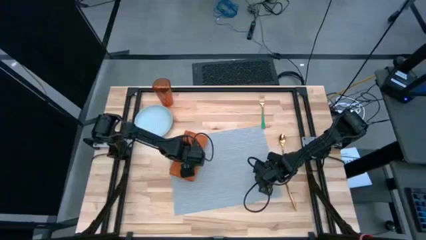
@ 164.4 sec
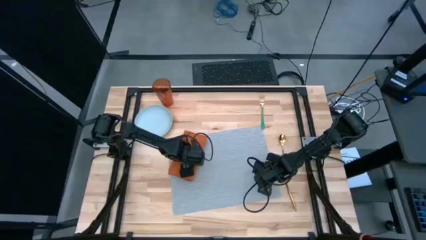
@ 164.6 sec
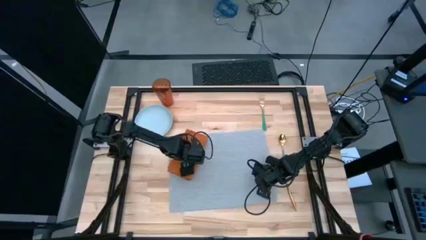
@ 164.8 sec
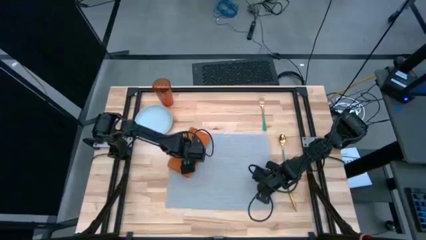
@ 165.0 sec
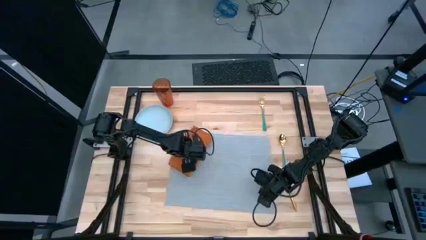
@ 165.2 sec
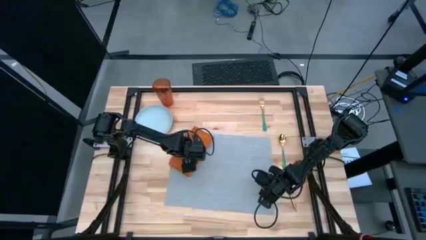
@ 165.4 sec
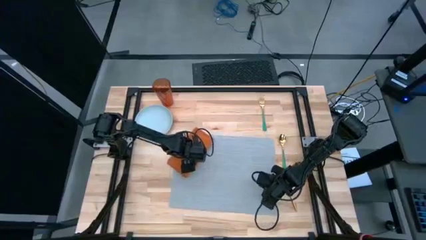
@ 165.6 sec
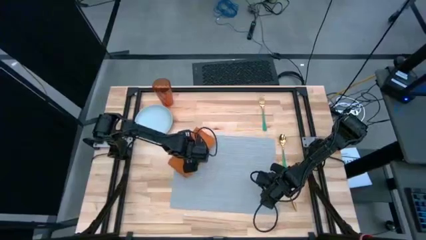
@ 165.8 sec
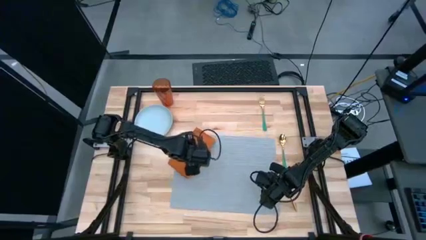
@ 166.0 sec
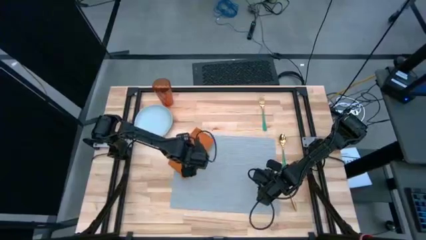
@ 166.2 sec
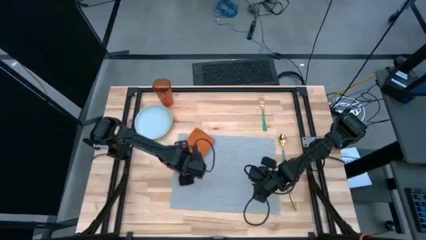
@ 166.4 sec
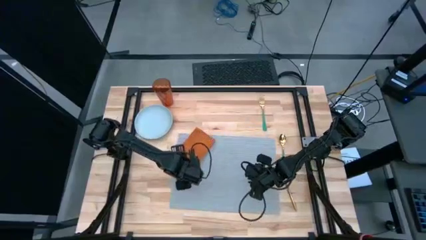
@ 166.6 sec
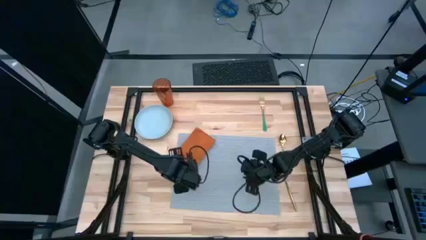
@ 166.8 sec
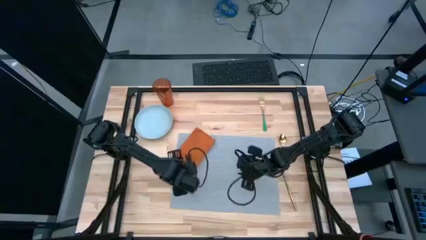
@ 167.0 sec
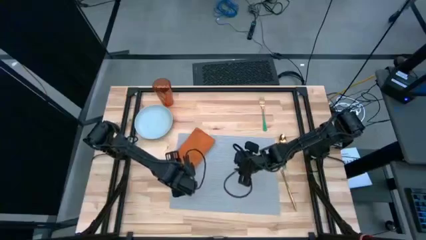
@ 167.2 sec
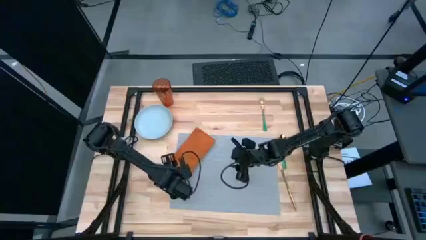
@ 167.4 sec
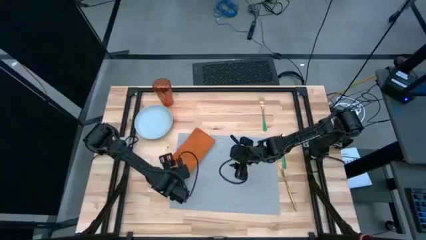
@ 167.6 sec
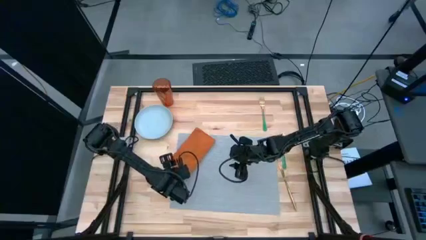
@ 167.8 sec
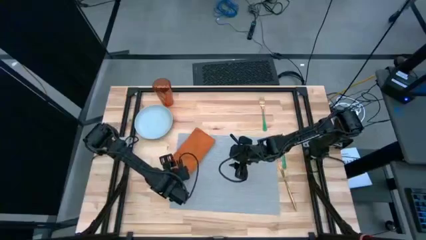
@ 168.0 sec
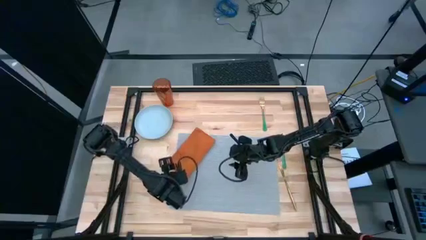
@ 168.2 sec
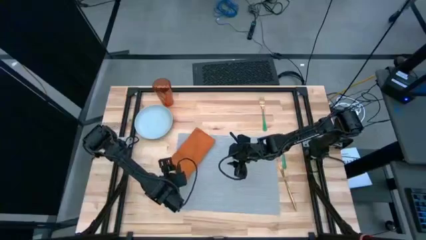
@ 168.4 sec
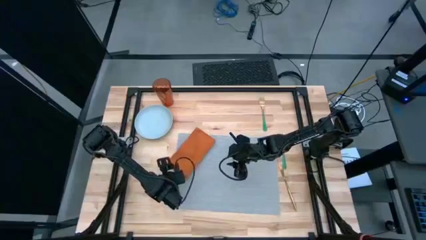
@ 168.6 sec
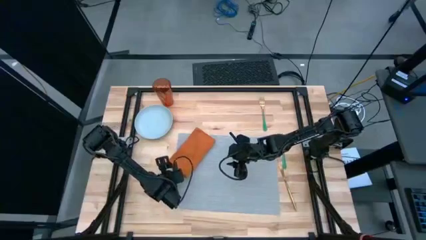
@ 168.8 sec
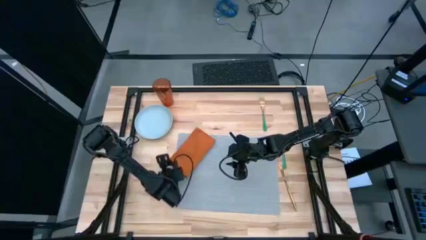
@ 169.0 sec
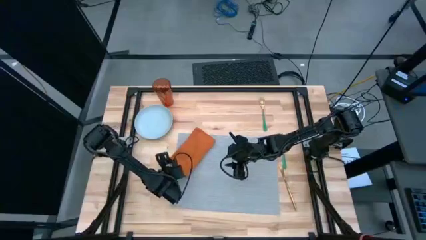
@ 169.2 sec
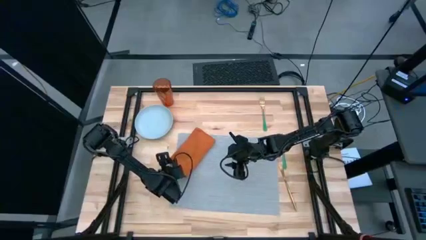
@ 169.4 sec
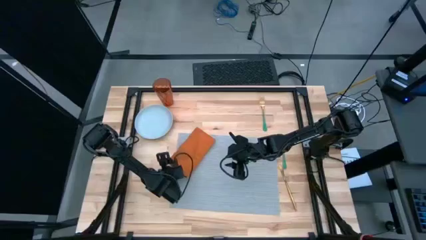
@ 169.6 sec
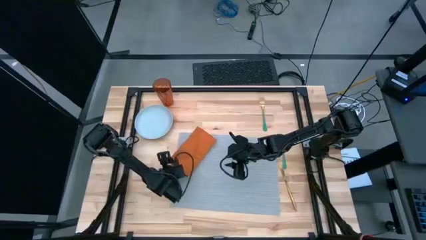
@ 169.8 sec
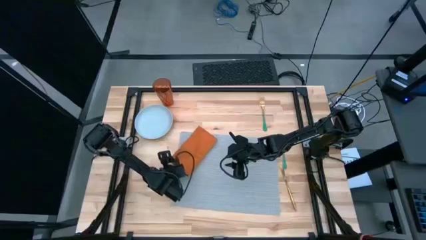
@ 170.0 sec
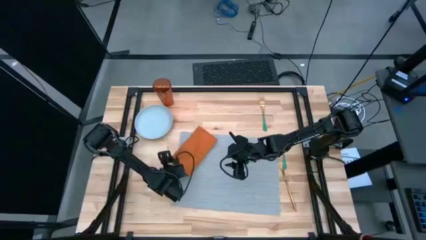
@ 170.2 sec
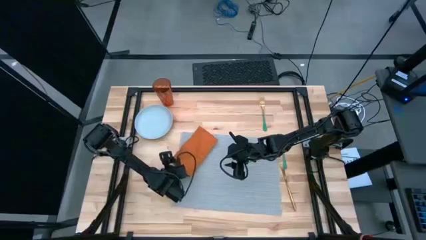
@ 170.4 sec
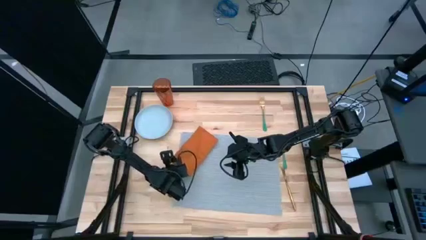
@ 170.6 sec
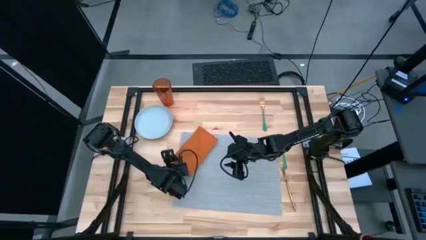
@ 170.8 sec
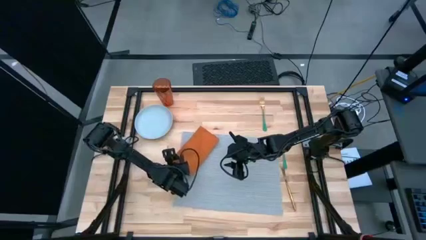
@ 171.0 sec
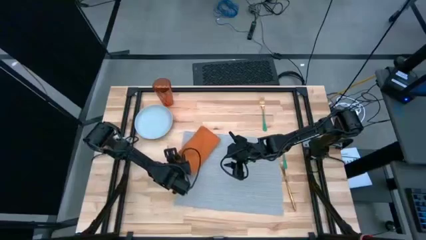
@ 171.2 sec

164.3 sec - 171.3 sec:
Task: Set table place
Adjust the placemat

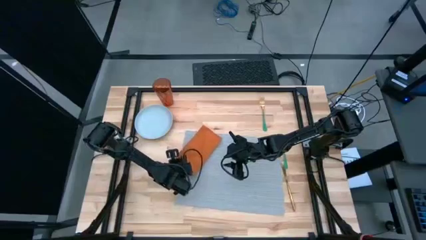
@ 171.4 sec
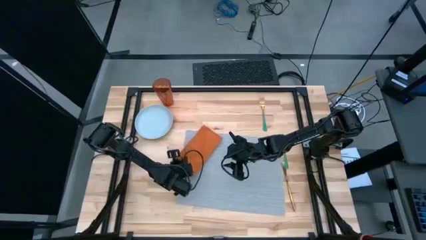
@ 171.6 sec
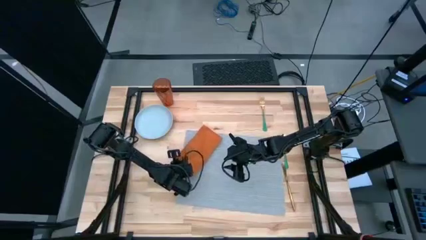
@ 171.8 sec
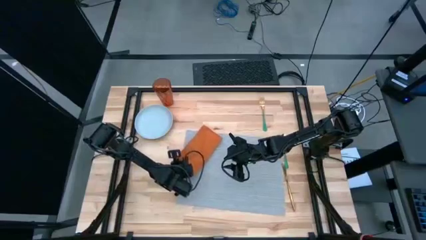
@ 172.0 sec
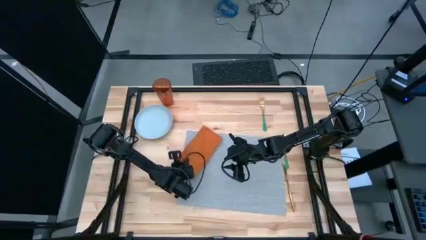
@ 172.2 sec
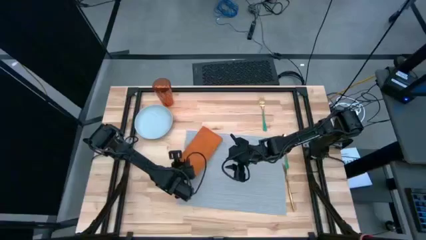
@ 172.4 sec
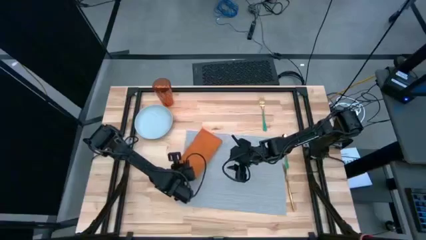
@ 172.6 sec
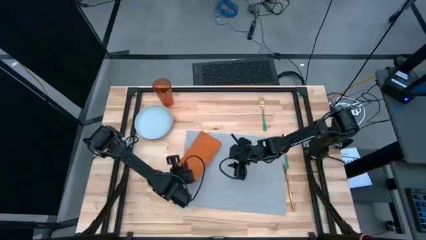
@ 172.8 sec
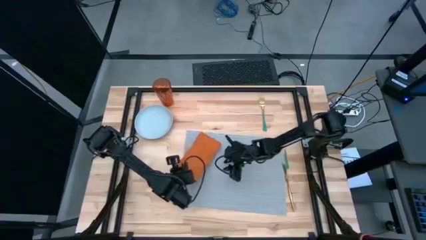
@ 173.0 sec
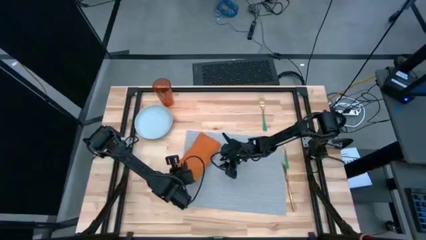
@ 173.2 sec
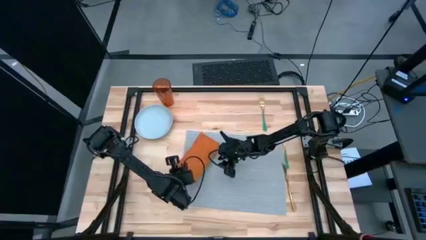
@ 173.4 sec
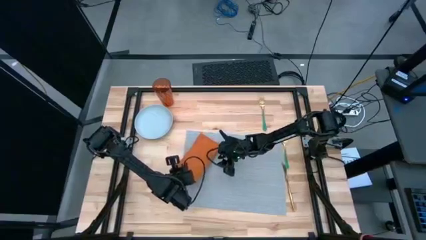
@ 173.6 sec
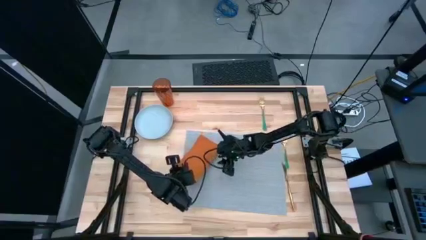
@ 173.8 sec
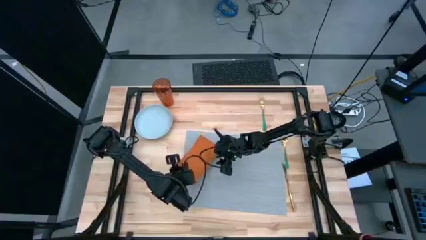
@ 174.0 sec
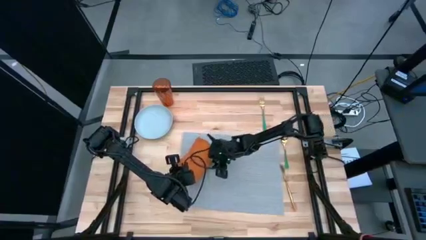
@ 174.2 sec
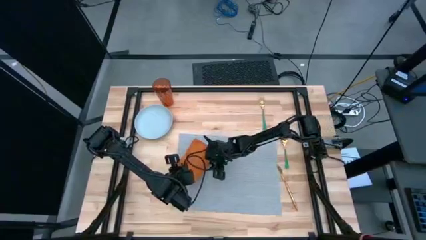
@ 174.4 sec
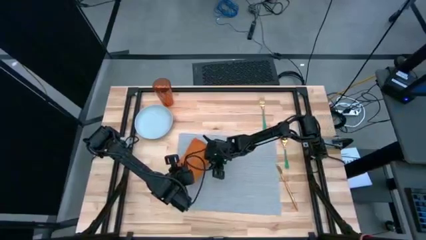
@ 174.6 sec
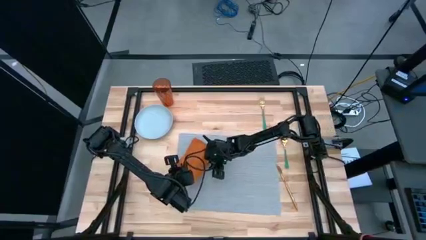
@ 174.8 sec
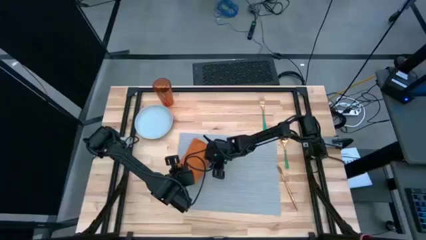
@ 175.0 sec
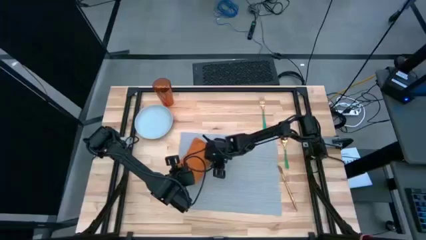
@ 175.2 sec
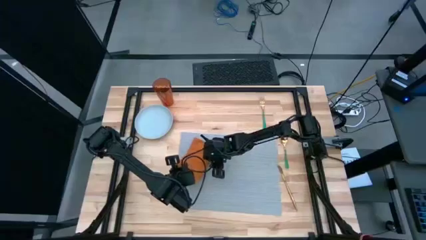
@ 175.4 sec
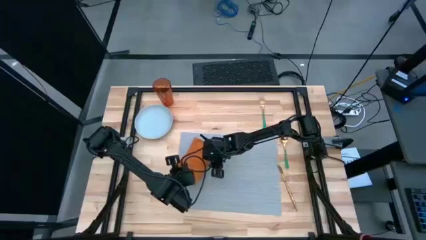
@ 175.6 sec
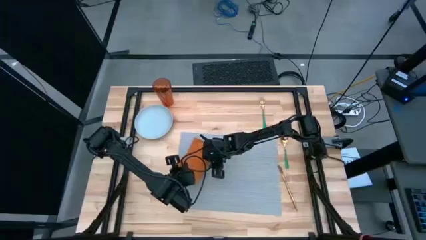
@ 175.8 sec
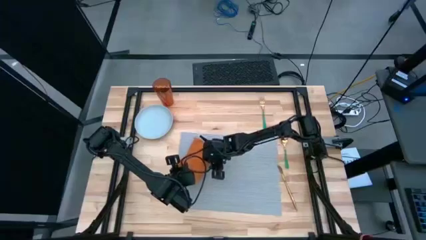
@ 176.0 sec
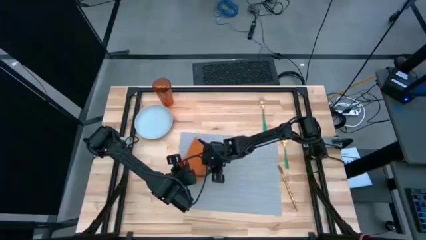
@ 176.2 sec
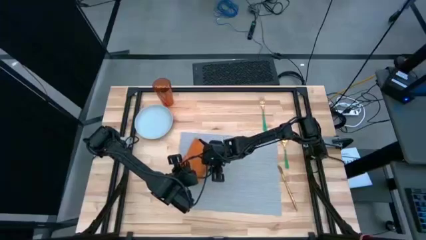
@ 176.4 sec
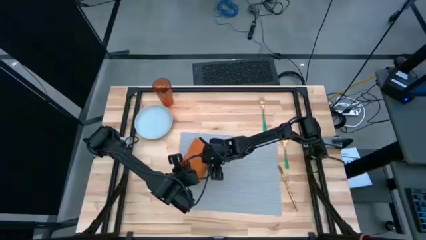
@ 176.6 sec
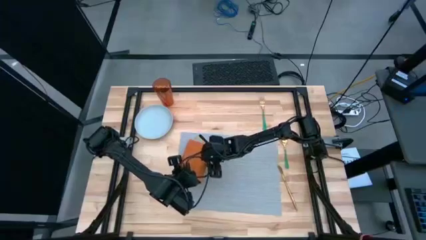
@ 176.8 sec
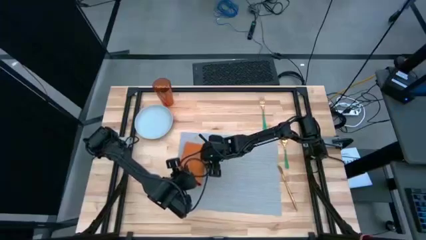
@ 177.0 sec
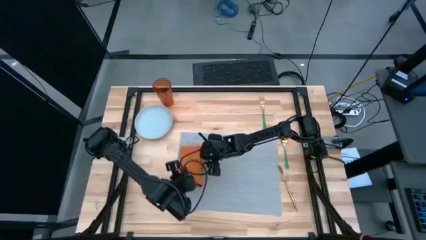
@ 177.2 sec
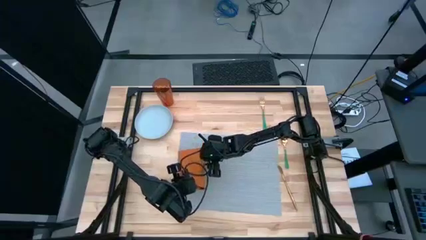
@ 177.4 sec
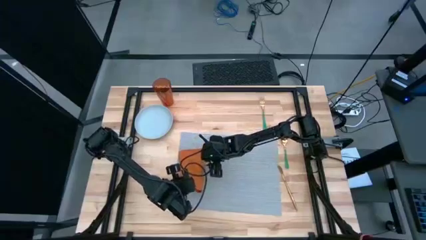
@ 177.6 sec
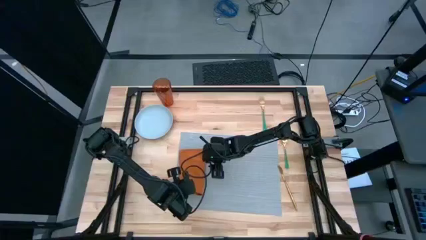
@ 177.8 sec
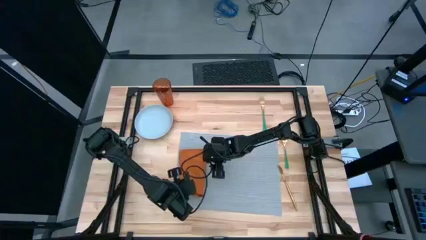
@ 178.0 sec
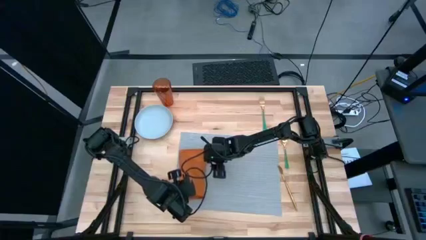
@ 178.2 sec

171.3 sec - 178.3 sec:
Adjust the orange napkin to the left of placemat

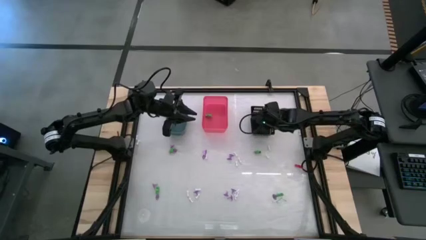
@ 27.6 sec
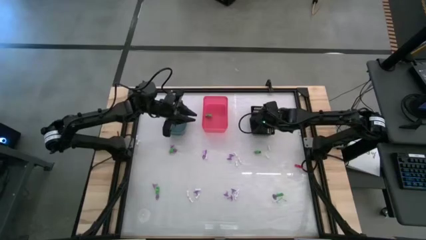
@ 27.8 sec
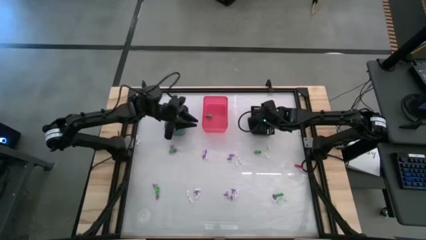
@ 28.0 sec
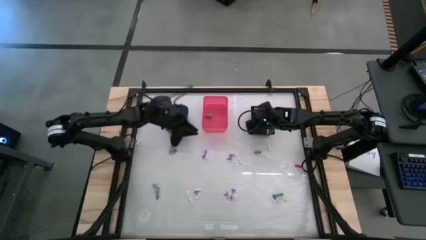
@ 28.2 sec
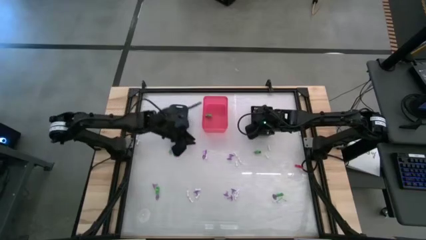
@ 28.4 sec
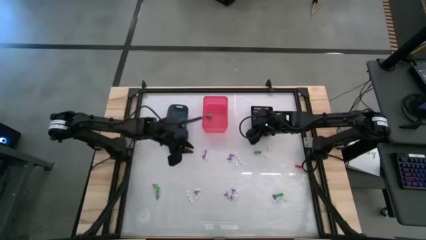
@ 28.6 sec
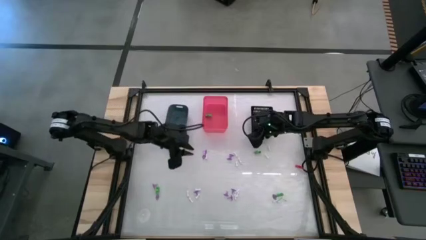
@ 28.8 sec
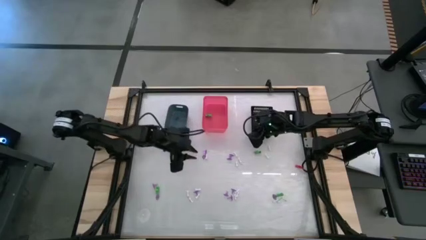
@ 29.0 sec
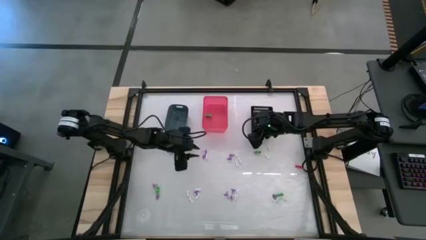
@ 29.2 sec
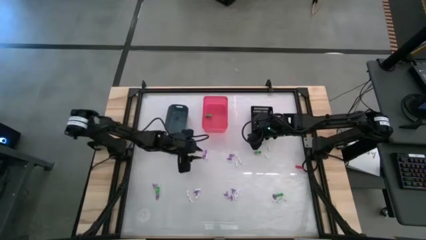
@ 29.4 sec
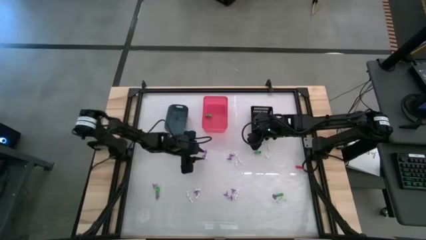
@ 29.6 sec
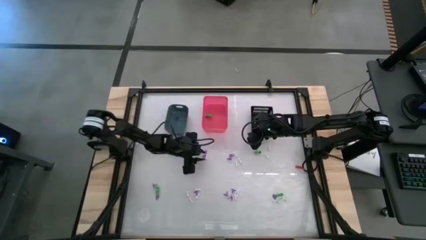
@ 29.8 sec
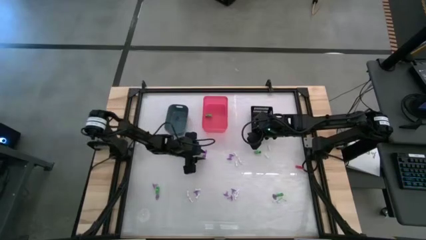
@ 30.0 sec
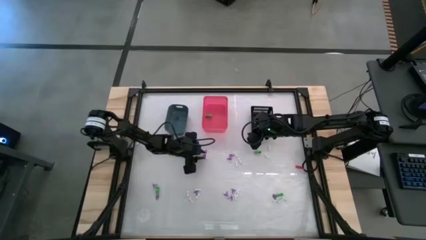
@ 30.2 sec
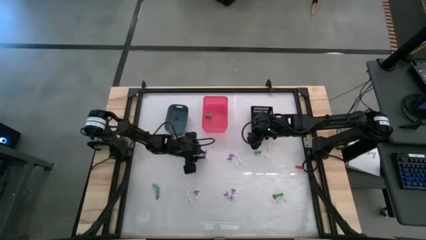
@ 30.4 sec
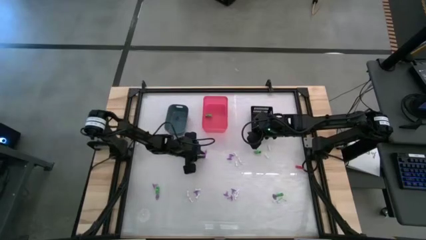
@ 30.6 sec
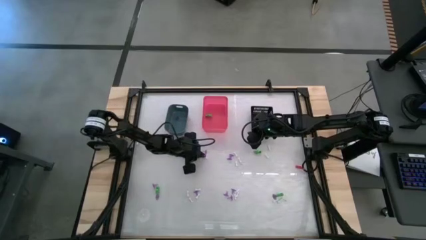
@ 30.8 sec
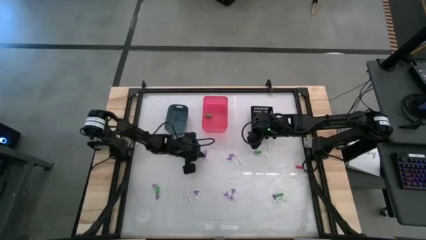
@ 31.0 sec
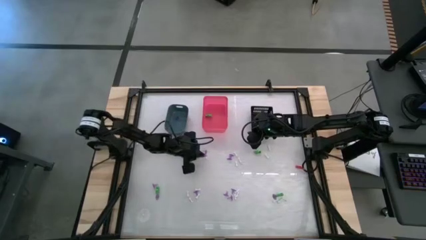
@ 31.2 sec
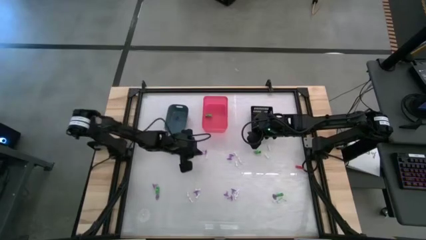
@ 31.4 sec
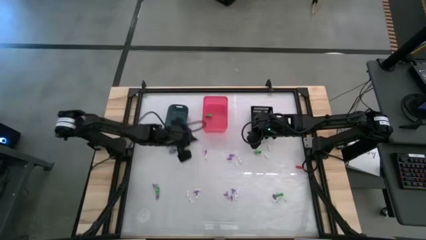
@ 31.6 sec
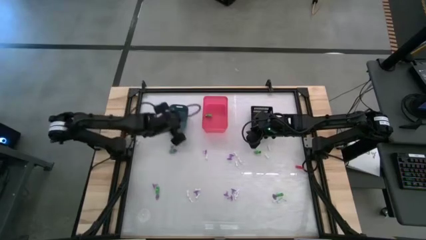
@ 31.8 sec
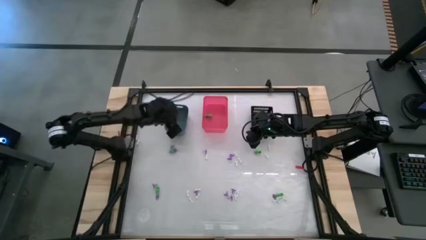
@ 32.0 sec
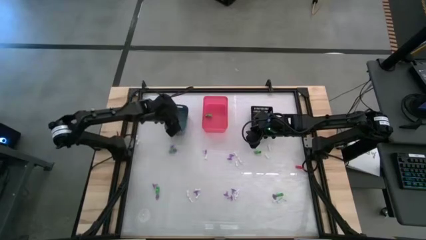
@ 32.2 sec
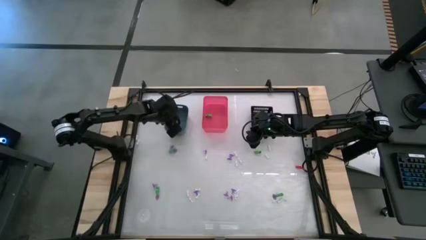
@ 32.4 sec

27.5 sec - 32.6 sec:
Task: Sort Halloween decoration
Put the purple witch hat toy into the blue bin
